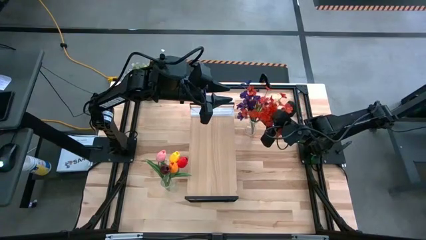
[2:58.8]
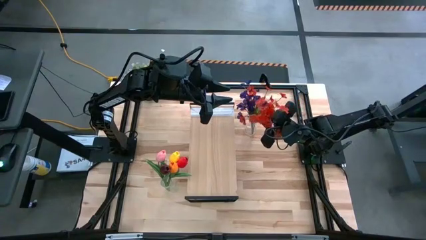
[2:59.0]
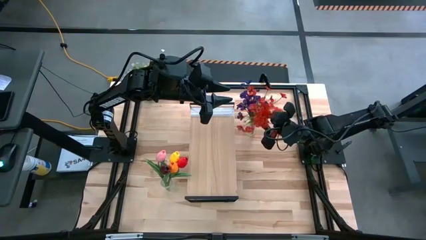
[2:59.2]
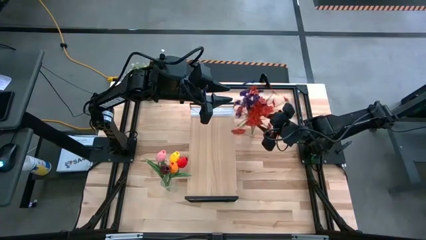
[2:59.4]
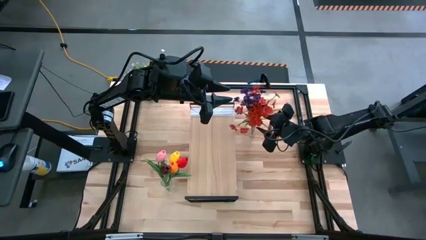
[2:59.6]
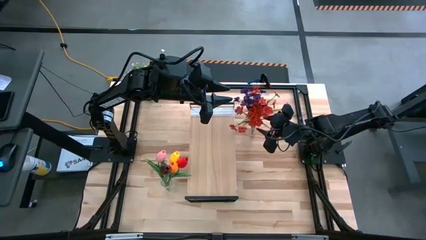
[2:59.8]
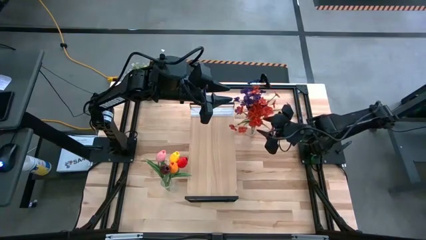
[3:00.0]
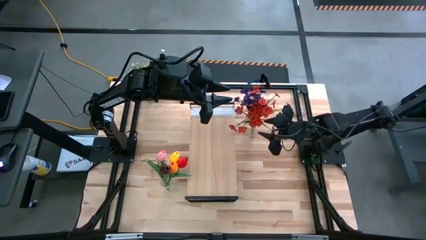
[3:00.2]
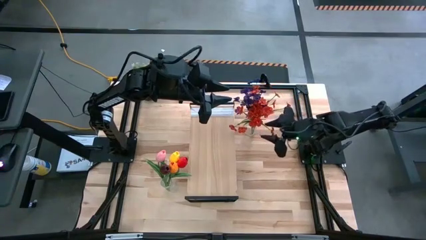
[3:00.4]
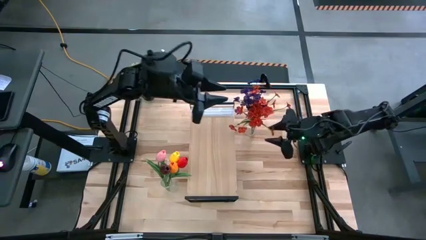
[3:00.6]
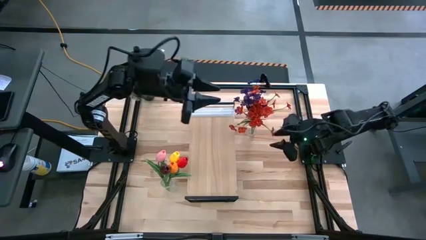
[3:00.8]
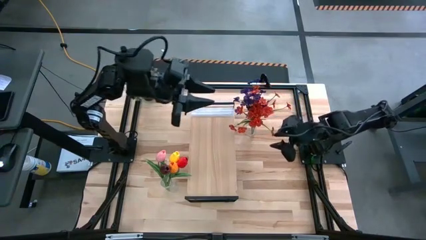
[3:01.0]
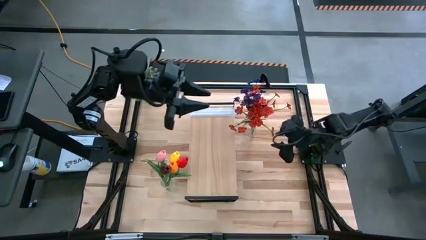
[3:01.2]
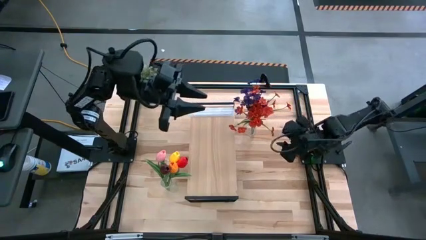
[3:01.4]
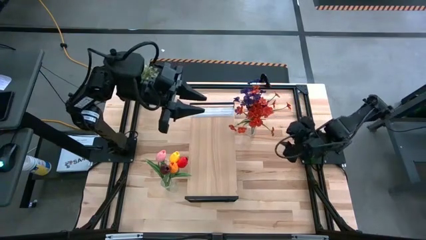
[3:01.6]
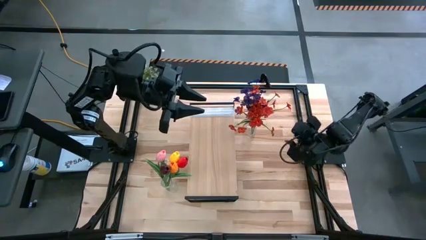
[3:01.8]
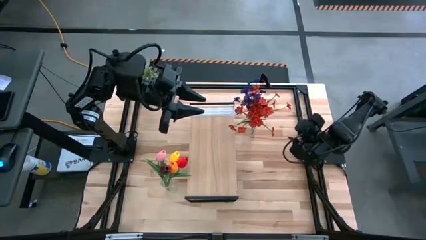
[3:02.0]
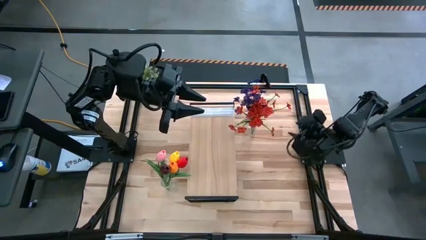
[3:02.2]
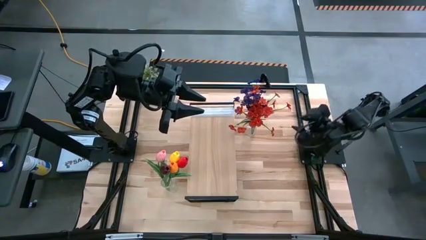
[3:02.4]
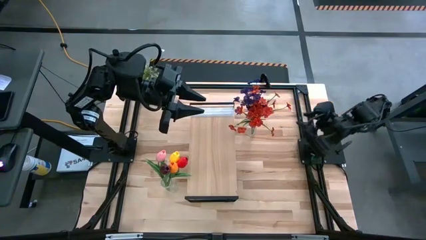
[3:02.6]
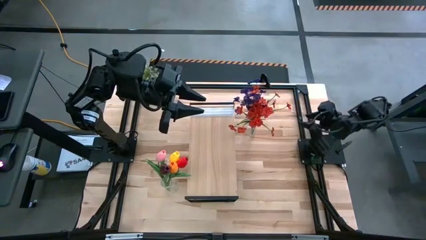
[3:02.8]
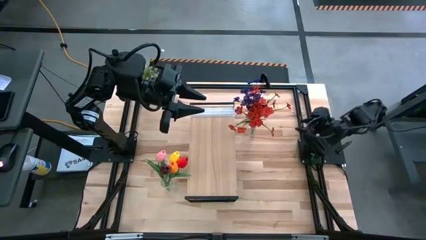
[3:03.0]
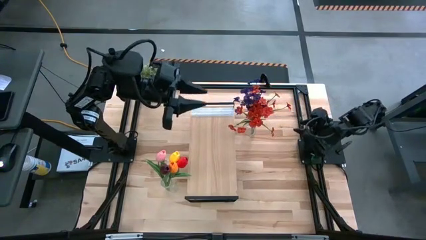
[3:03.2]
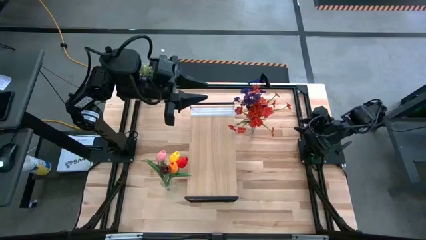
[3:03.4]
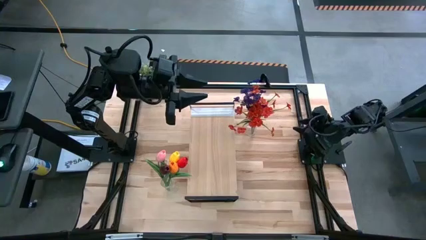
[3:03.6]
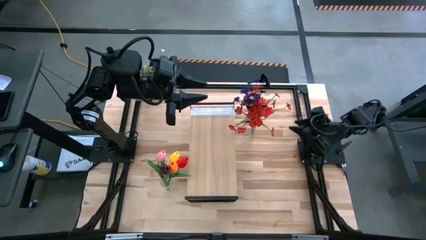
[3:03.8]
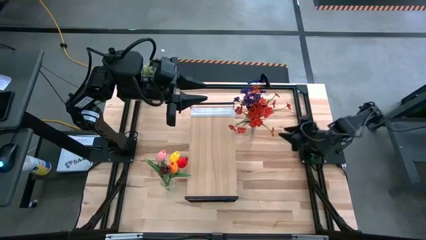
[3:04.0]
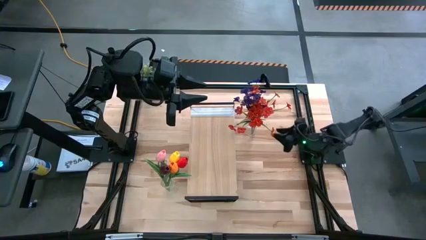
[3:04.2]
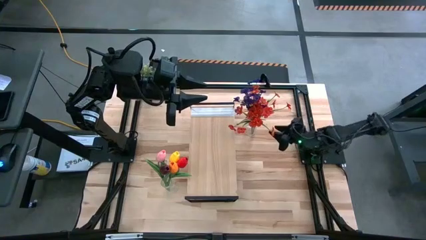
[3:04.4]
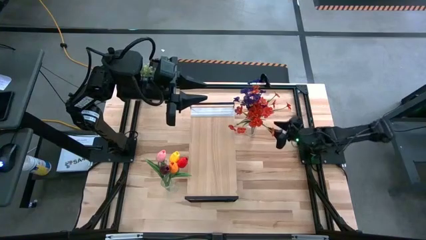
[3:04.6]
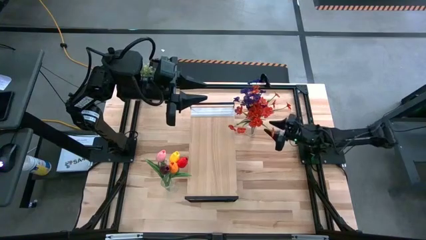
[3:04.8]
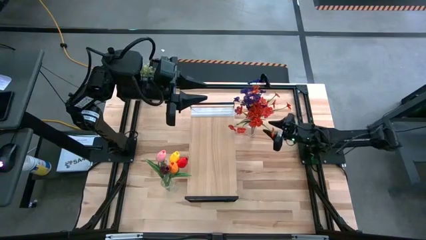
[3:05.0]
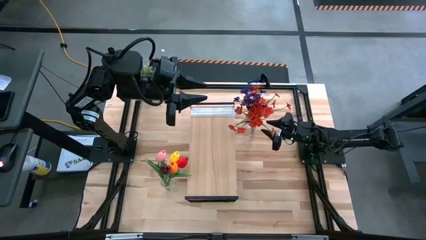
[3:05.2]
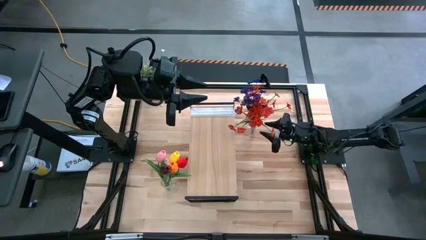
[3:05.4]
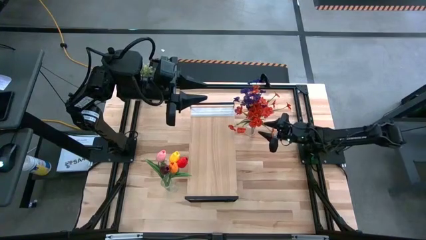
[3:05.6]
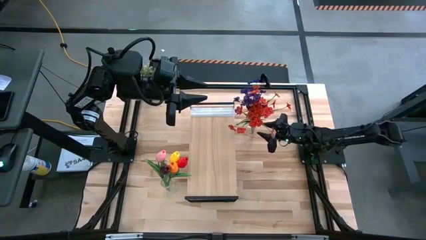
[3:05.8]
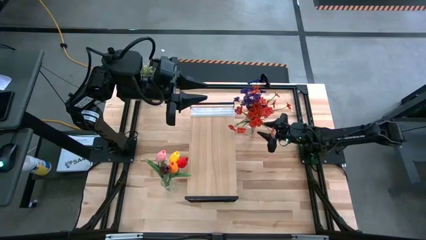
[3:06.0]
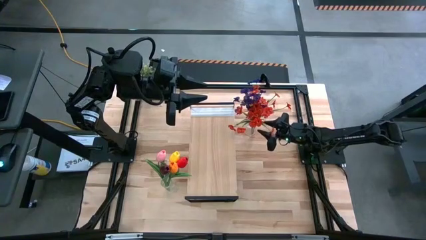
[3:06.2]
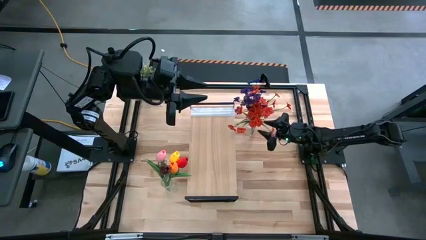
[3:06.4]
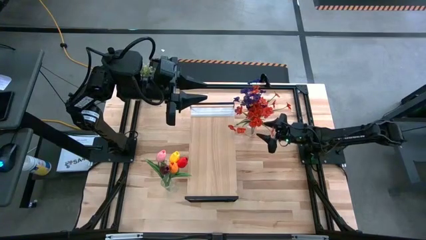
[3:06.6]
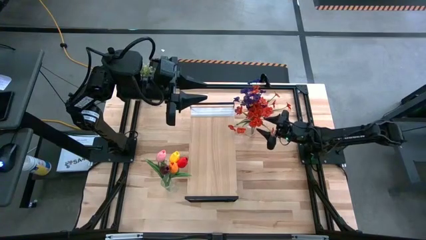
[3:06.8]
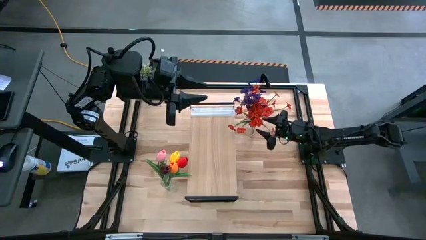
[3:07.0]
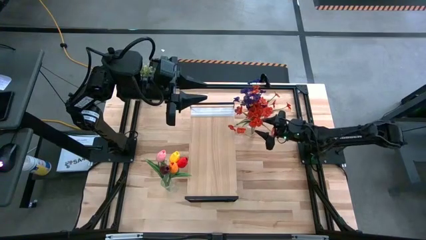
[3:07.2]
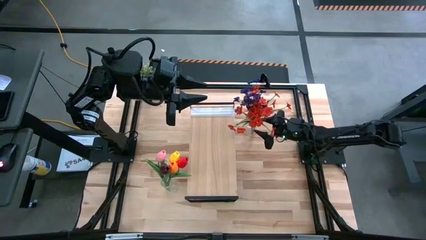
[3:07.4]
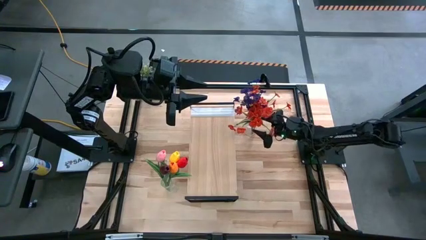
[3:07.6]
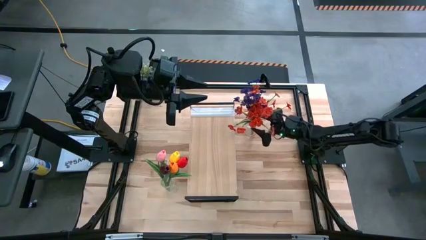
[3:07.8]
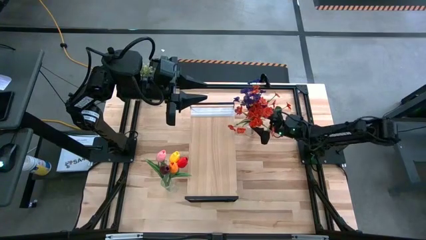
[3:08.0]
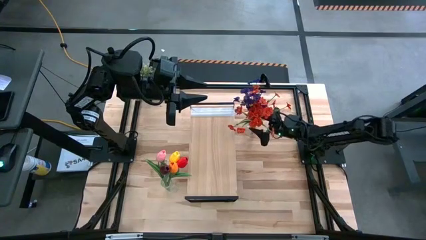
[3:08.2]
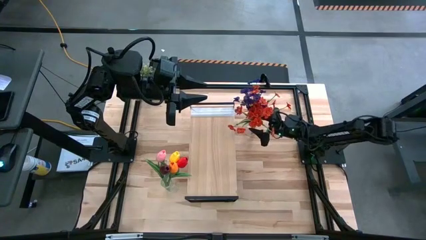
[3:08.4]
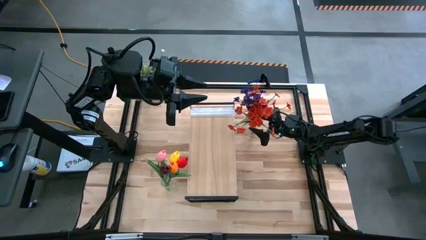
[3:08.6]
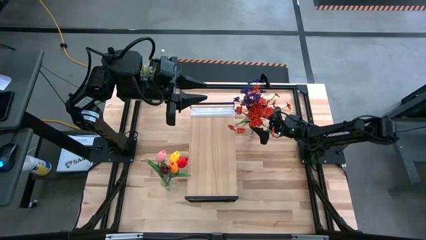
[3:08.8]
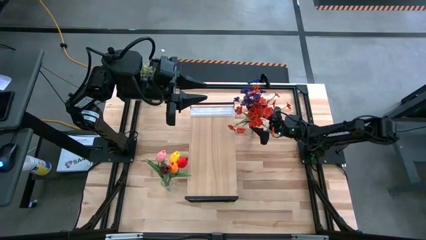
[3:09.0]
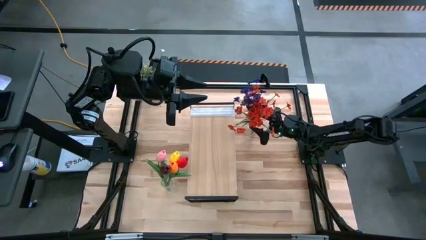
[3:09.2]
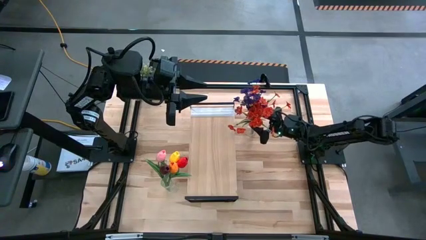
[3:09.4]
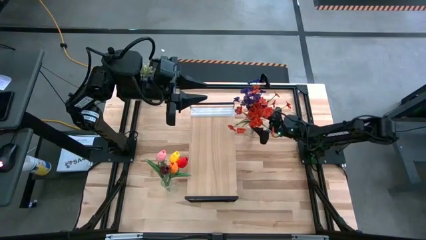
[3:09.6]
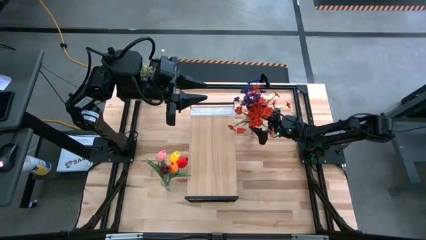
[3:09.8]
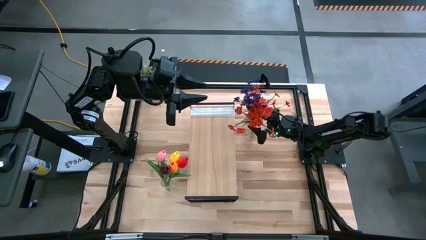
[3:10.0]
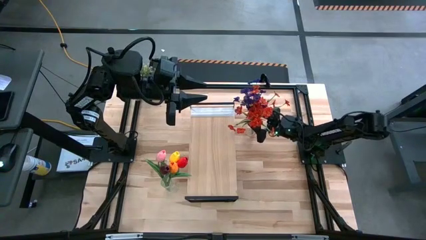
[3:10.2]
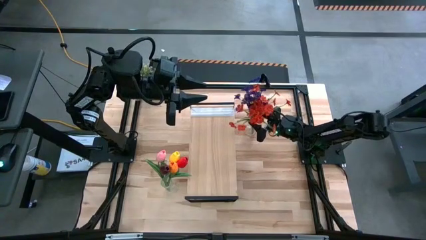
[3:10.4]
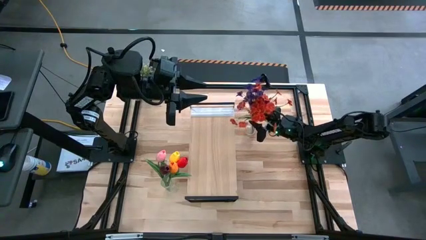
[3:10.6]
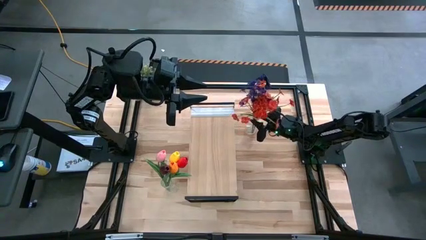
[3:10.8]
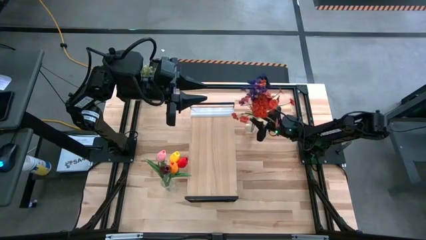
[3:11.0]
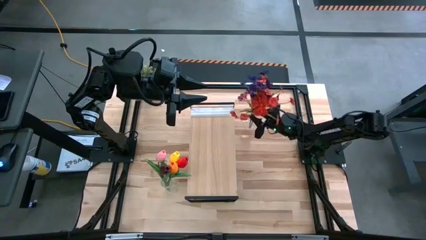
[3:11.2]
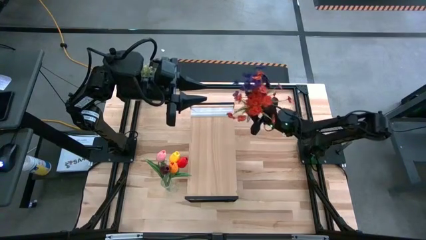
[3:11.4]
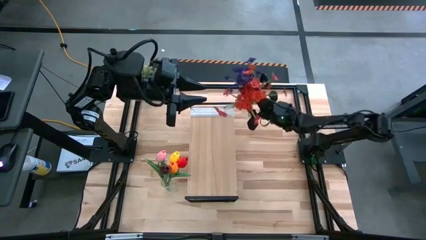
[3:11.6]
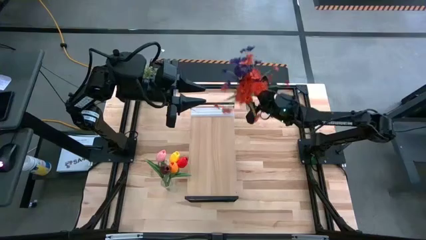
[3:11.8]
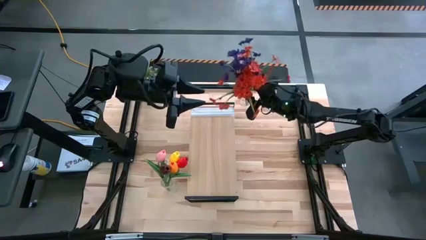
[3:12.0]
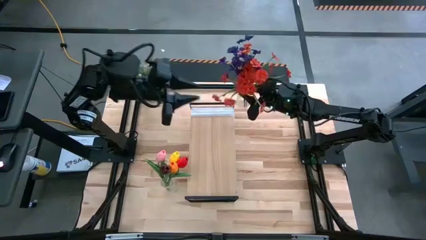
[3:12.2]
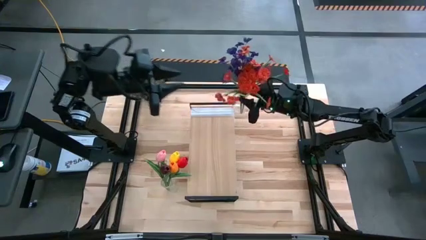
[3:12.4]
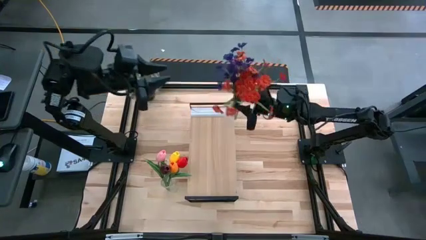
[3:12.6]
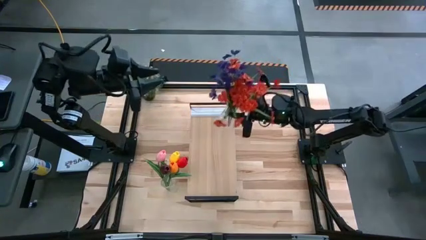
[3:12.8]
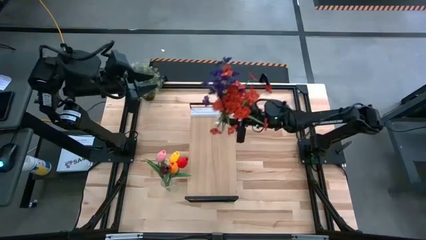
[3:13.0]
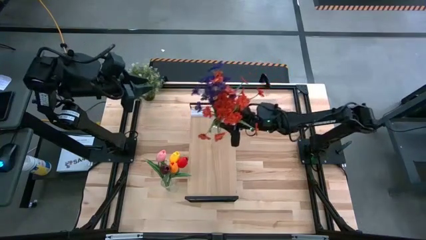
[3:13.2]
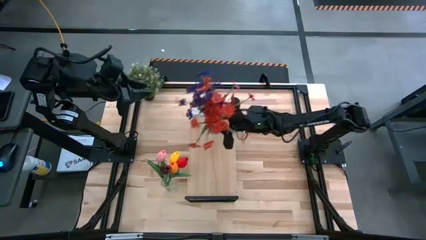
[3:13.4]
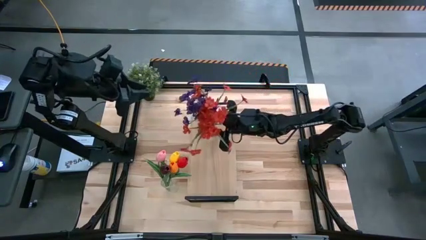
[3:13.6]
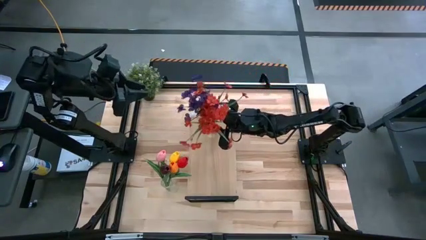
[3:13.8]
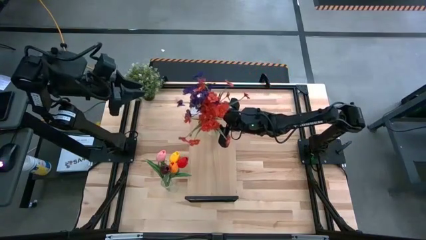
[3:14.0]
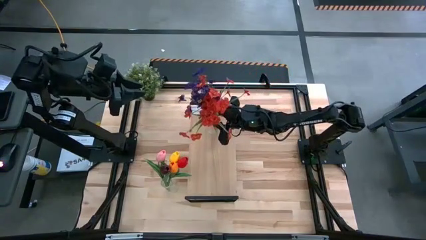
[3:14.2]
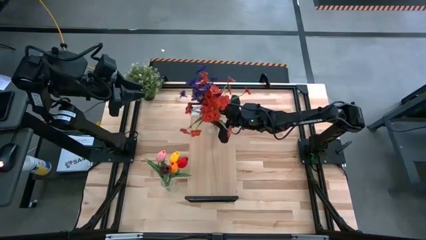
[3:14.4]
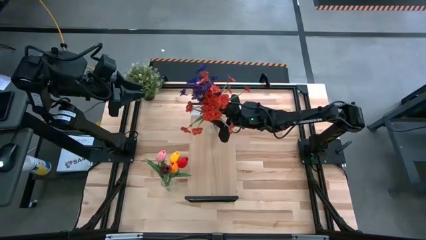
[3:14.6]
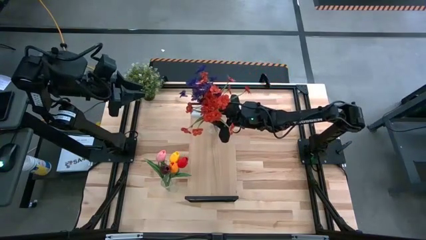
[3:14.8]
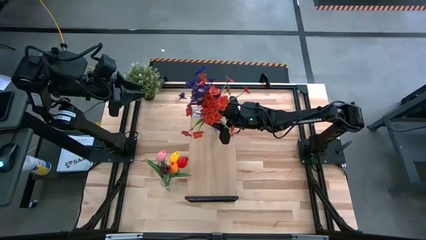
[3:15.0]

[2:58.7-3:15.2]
Task: Pick and place flowers into a vace then onto a shelf
Put the top flower vase on the shelf

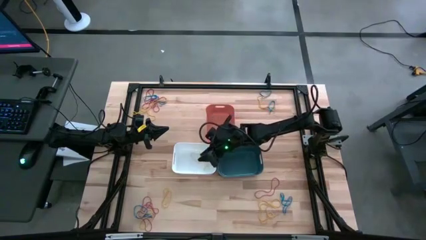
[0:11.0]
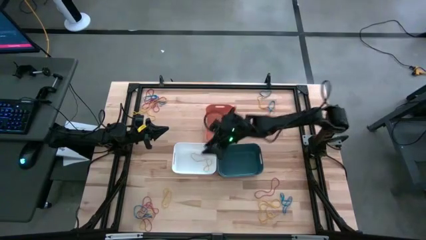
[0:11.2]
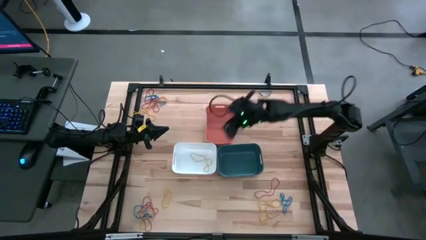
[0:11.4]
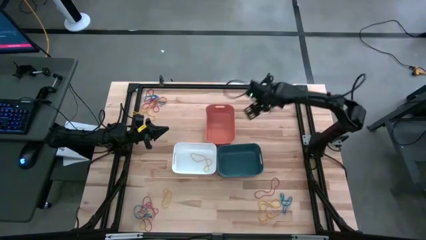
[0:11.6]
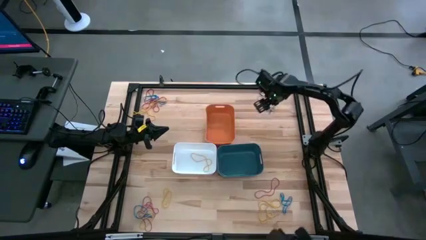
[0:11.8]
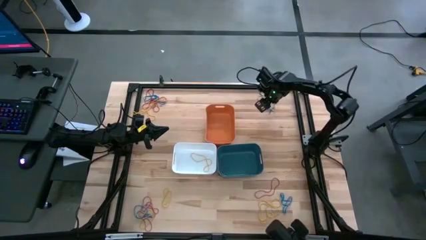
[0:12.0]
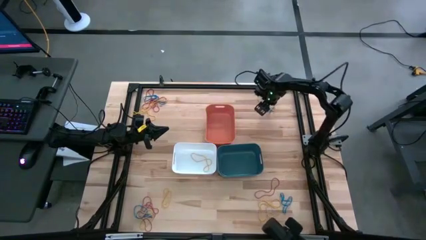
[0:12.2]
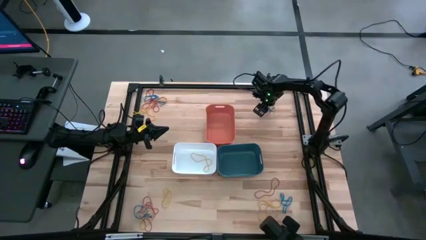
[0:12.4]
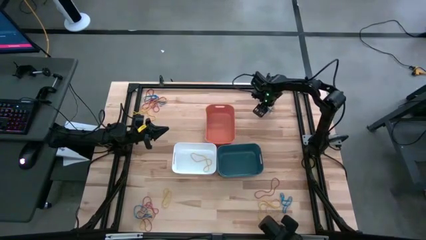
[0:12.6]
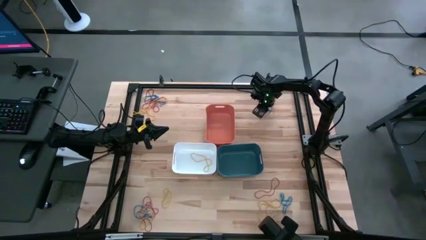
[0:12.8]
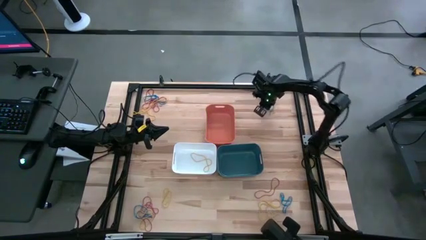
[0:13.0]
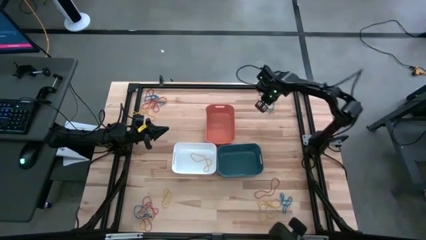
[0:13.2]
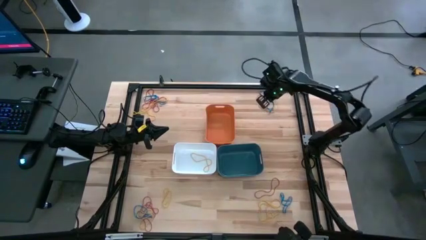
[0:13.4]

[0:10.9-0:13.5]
Task: Sort rubber bands into baskets
Put the yellow rubber band into the white bin
